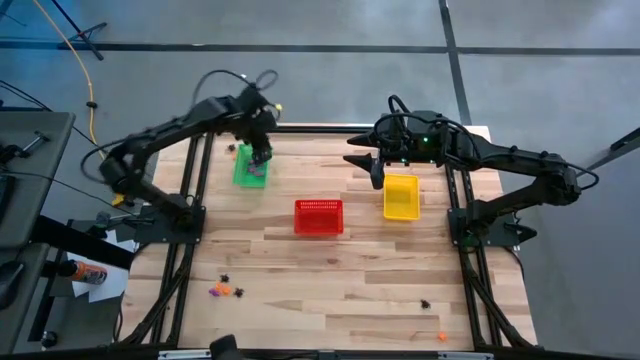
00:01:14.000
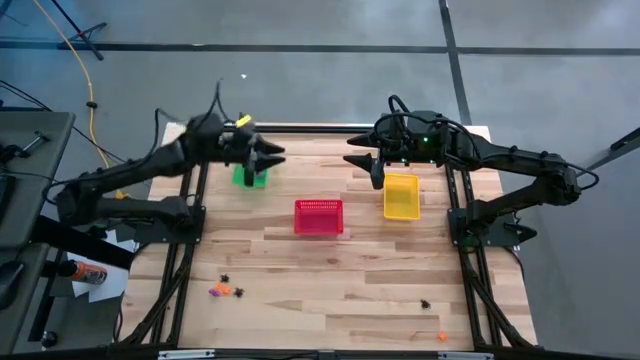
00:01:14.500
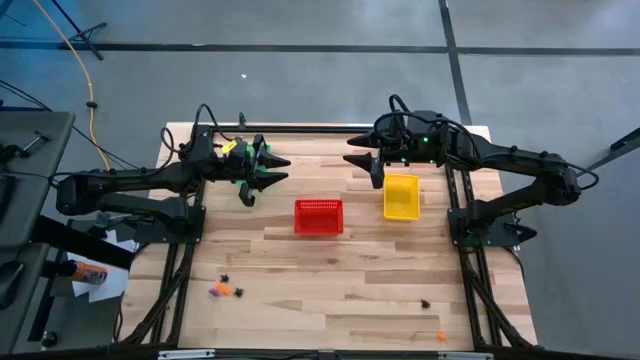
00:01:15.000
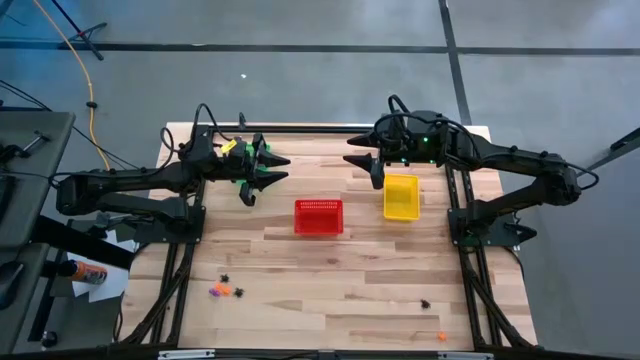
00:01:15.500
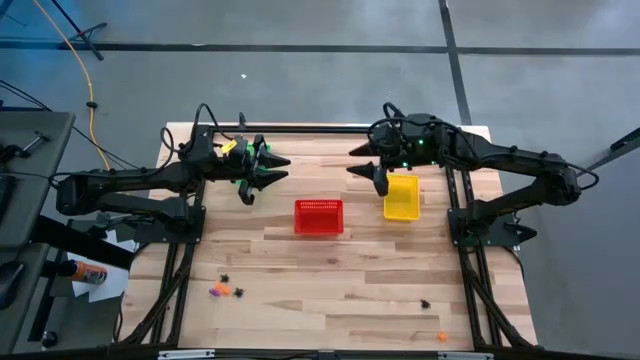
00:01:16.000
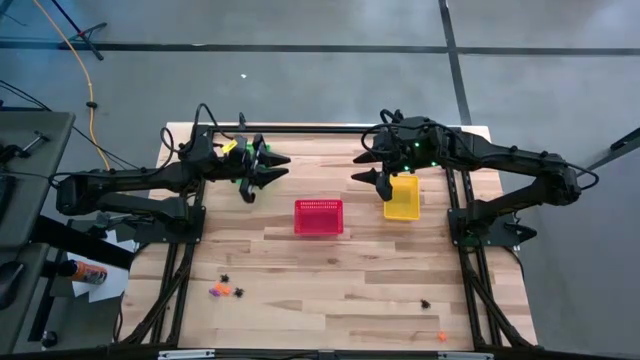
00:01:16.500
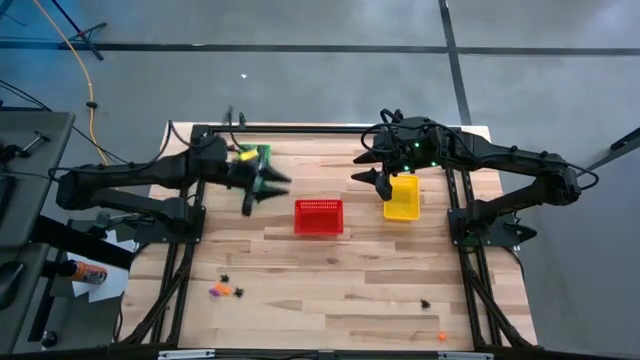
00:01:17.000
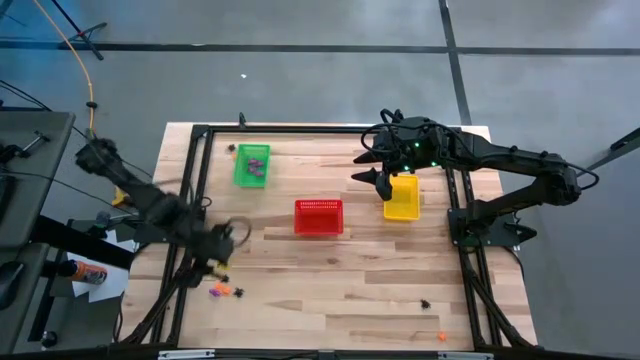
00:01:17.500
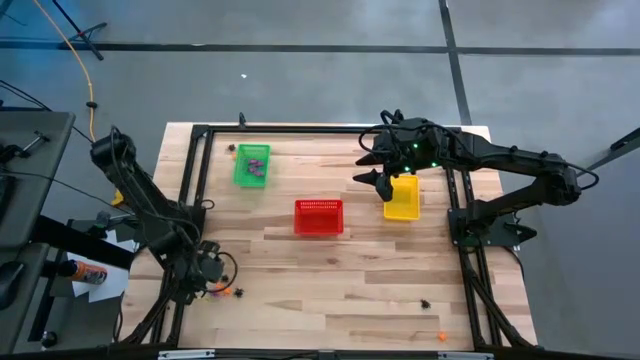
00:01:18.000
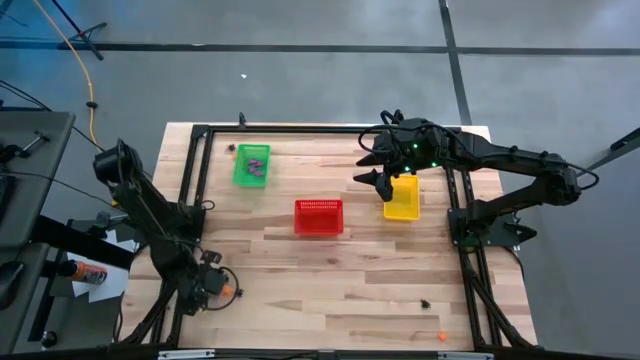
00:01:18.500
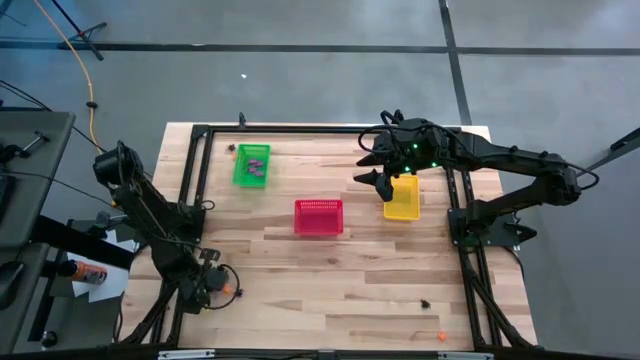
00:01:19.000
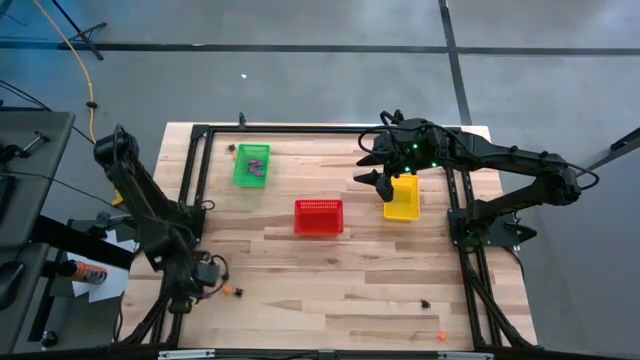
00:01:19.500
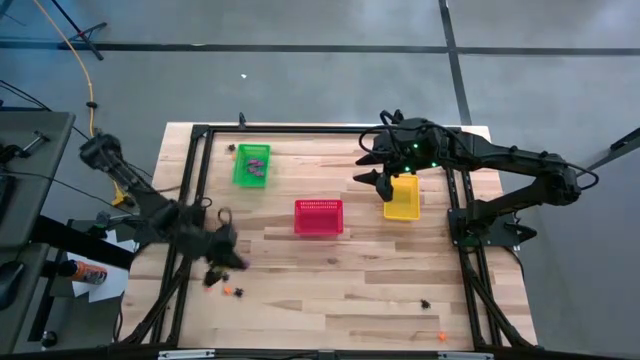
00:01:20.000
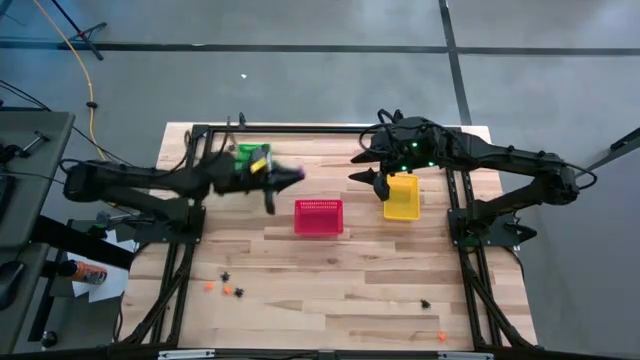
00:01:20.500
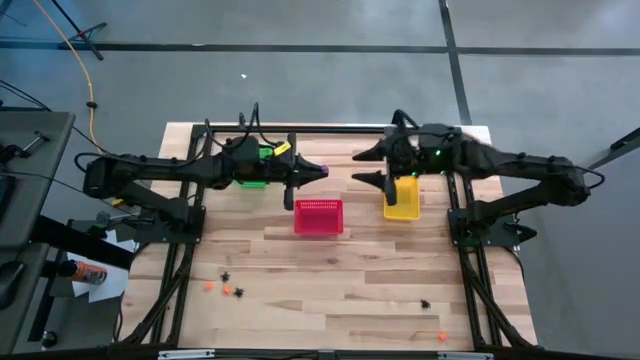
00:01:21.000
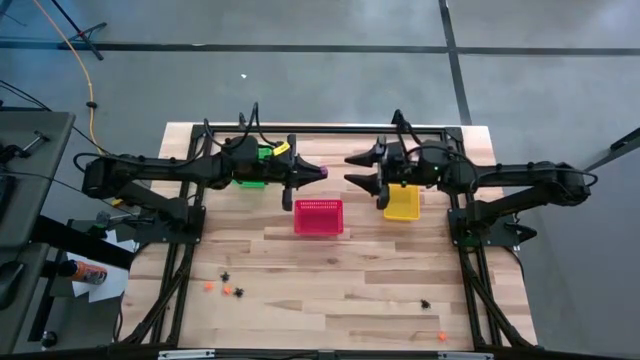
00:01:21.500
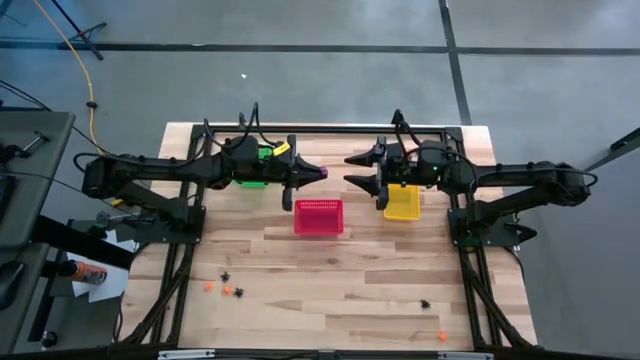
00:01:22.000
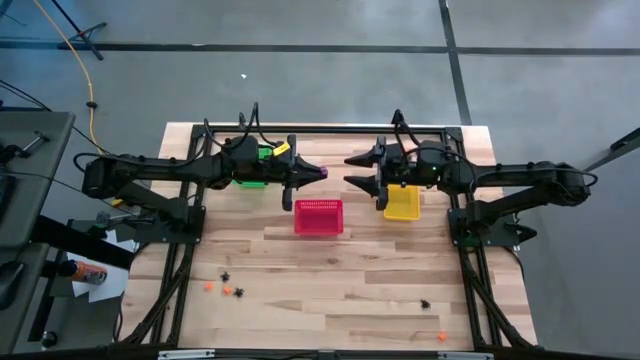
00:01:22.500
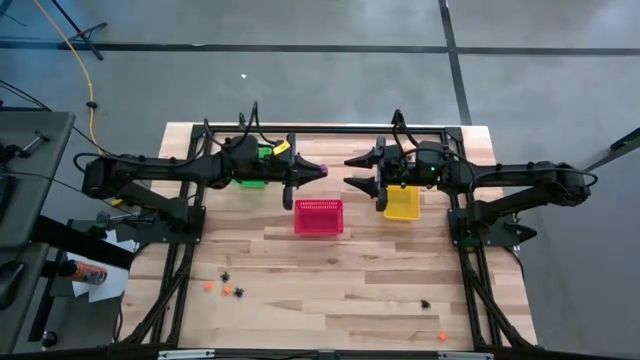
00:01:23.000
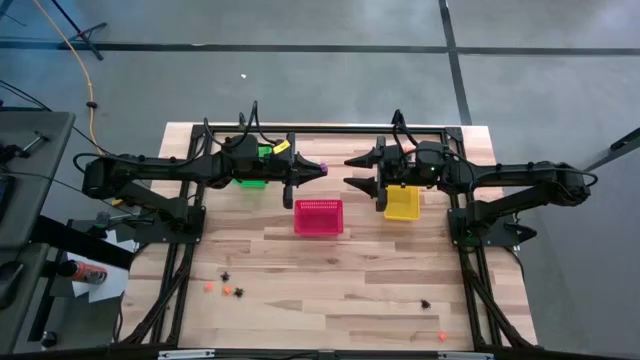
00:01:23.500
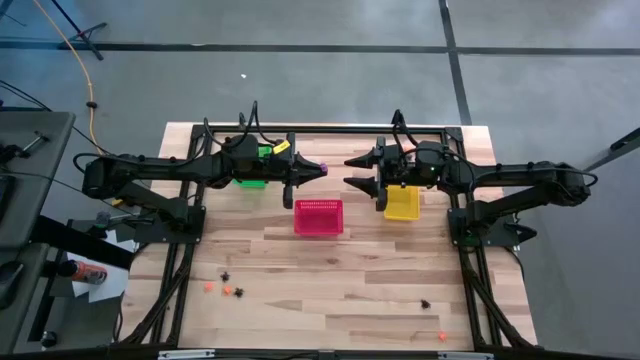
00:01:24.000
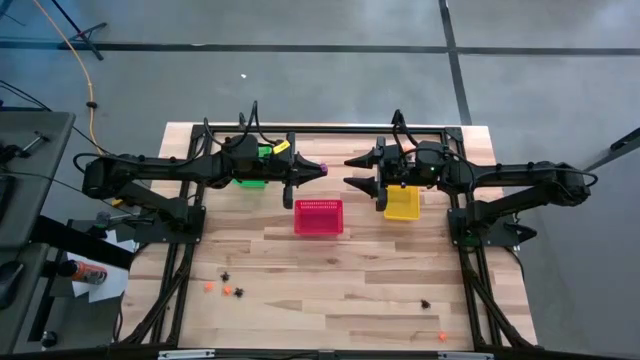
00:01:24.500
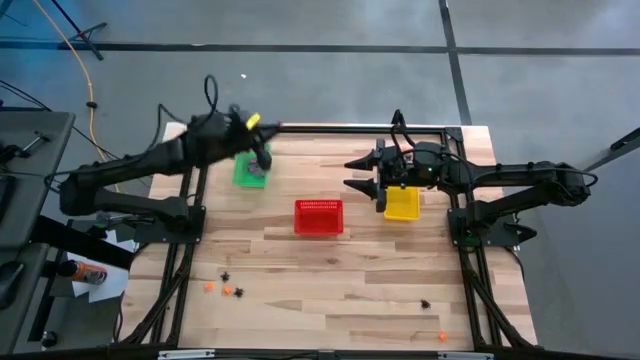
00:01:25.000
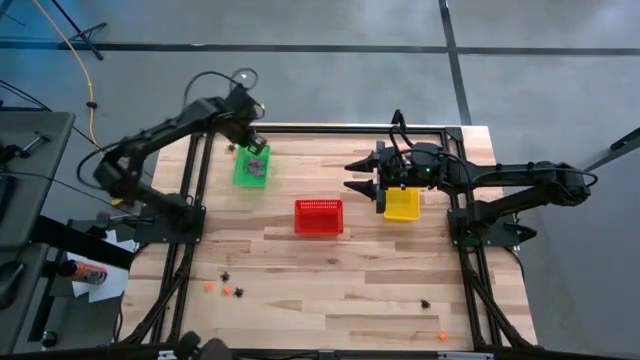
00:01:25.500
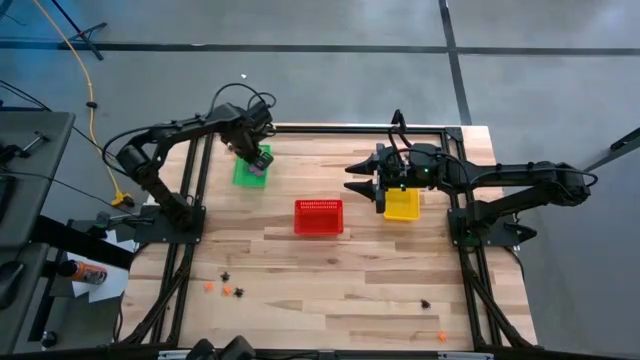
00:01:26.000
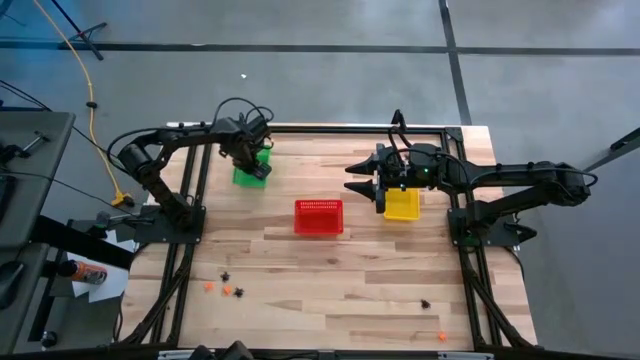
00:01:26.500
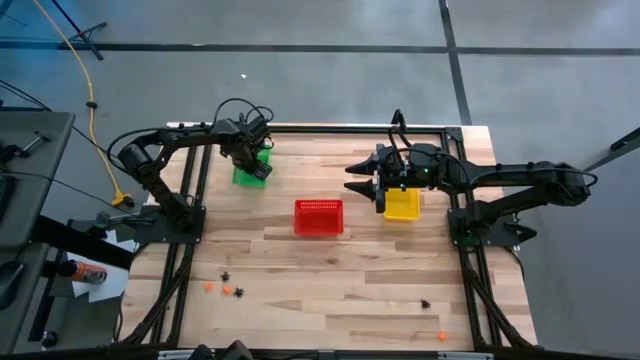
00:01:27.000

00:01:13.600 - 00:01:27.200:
Task: Sort Halloween decoration
Put the purple skeleton toy into the green bin

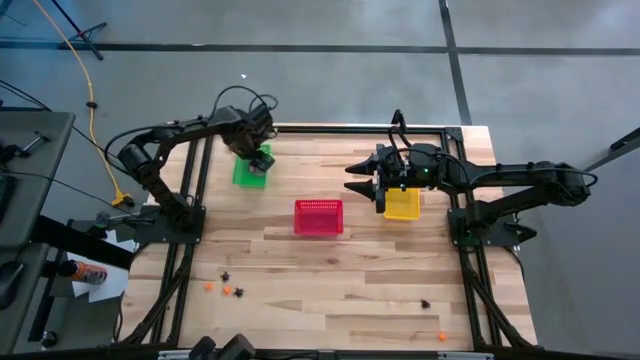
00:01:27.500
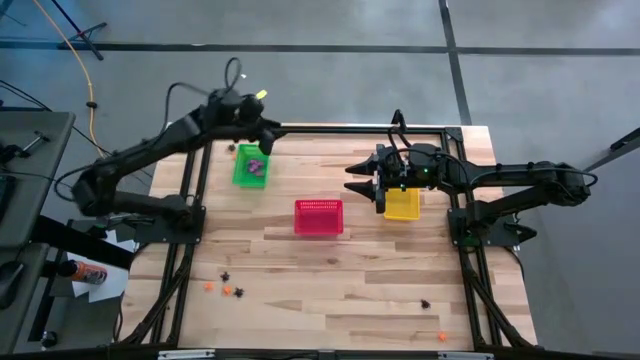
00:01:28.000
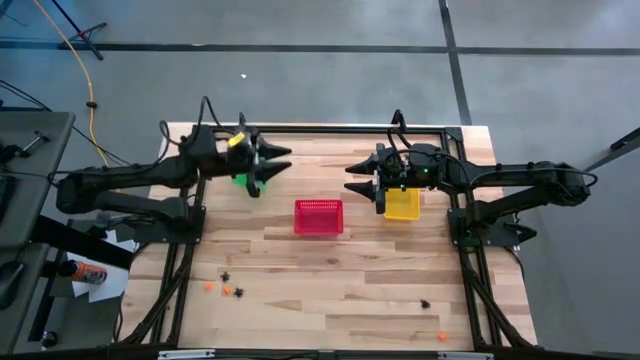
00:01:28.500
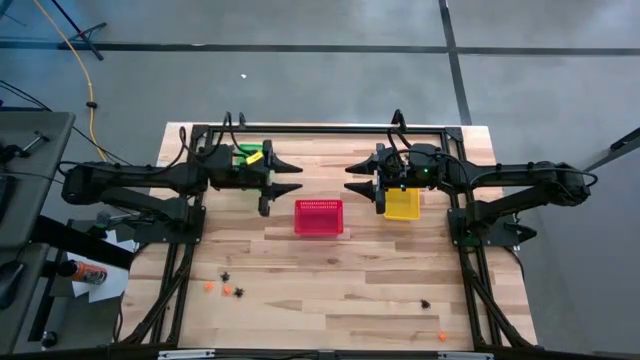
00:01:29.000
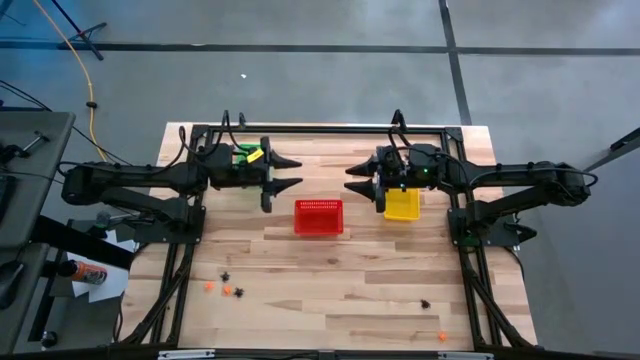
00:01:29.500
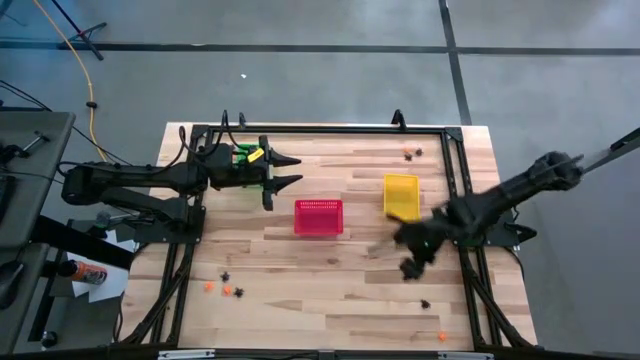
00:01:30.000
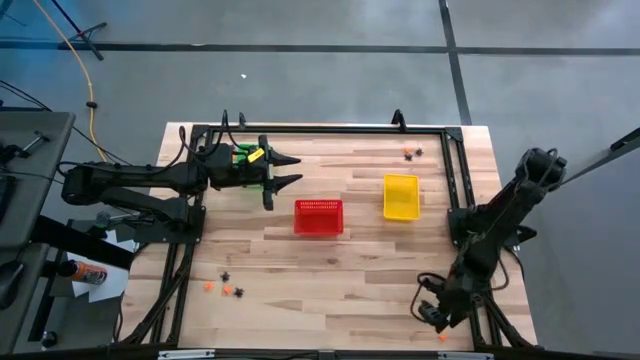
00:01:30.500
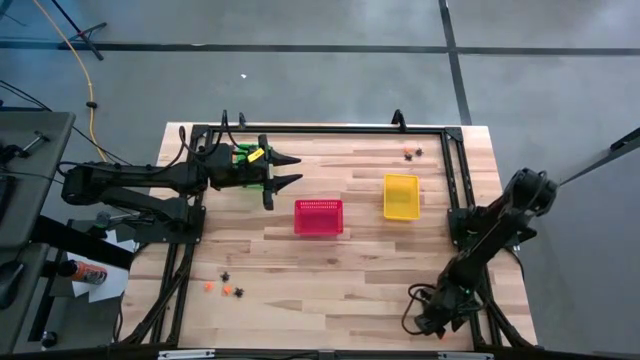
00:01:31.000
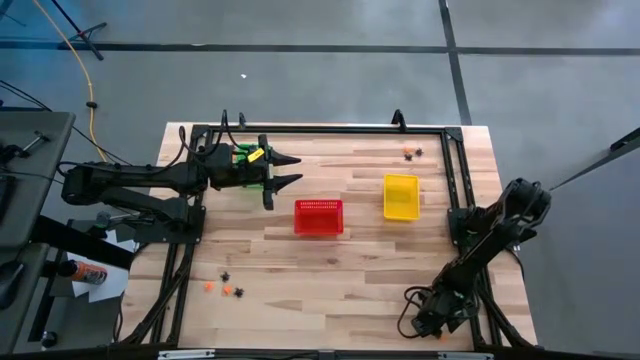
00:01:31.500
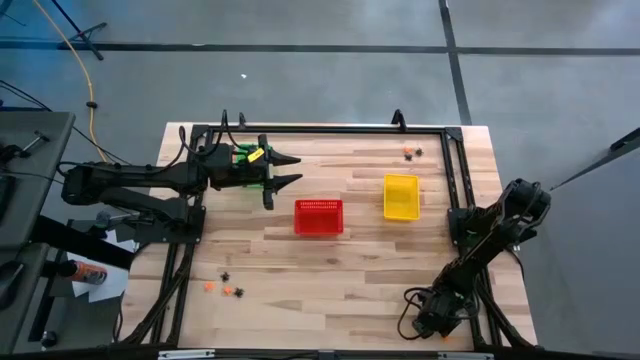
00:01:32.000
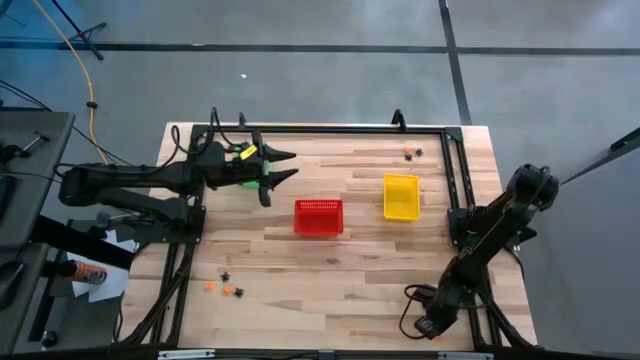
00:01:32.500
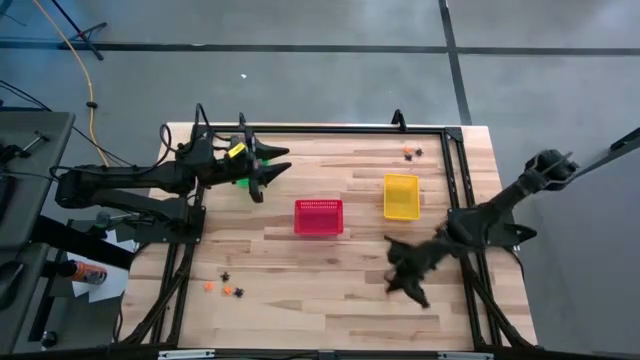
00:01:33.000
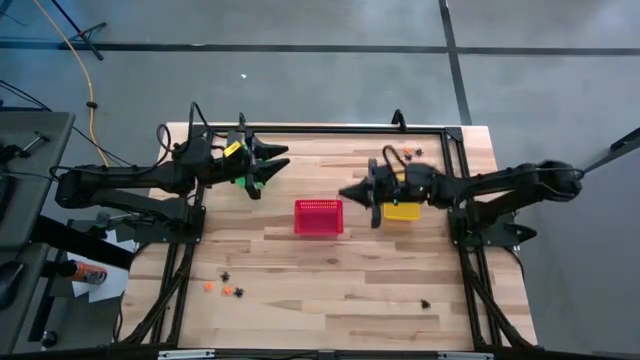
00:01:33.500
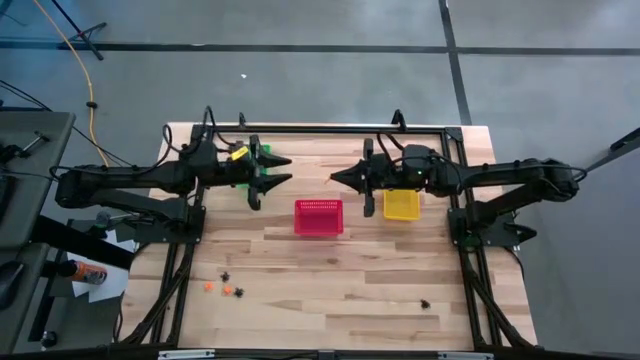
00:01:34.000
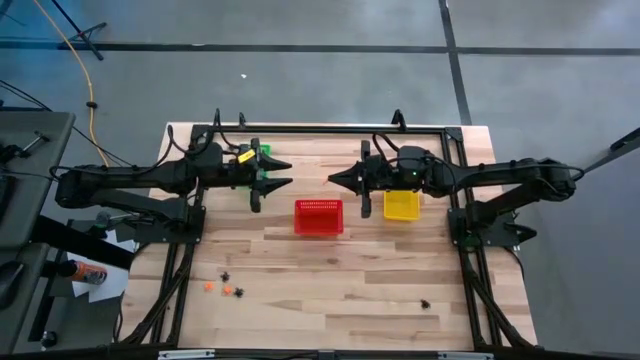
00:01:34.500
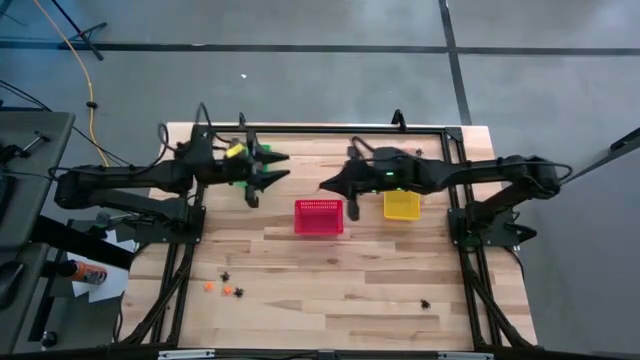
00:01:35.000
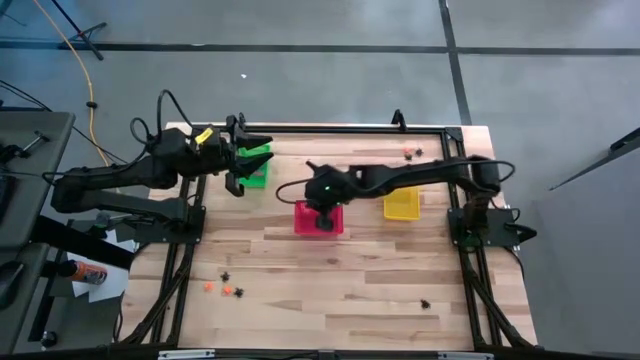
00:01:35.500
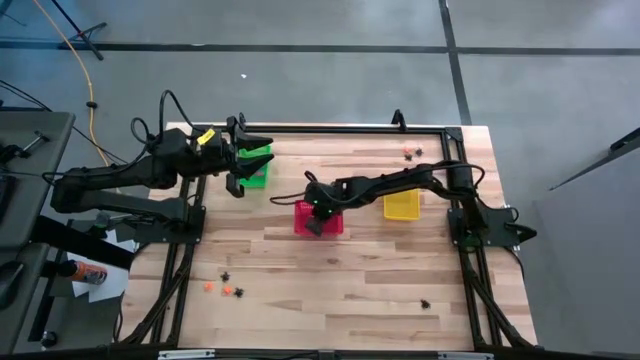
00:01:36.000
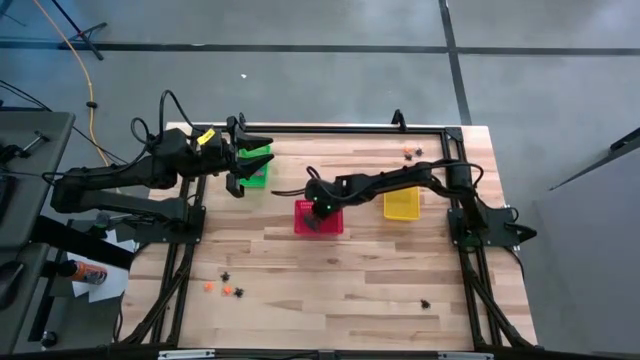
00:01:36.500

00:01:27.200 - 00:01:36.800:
Put the orange spider toy into the red bin
